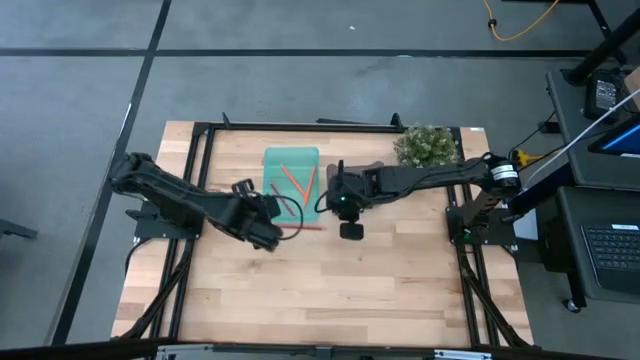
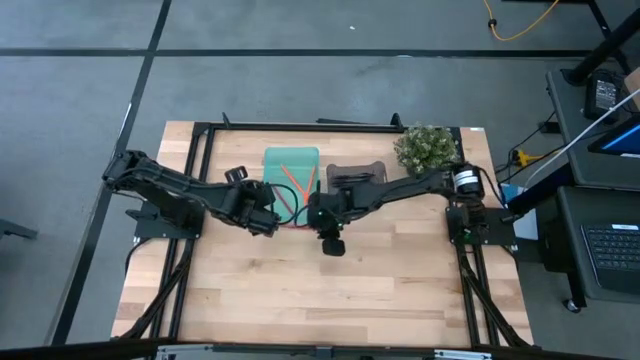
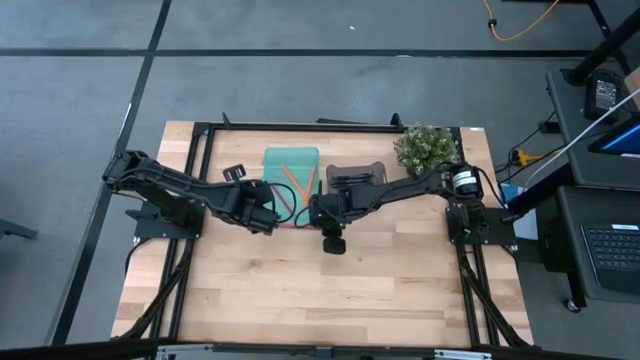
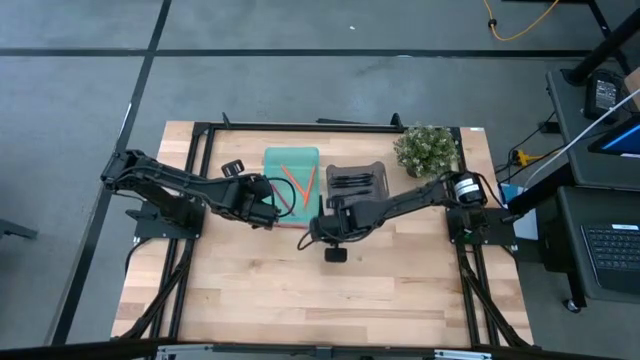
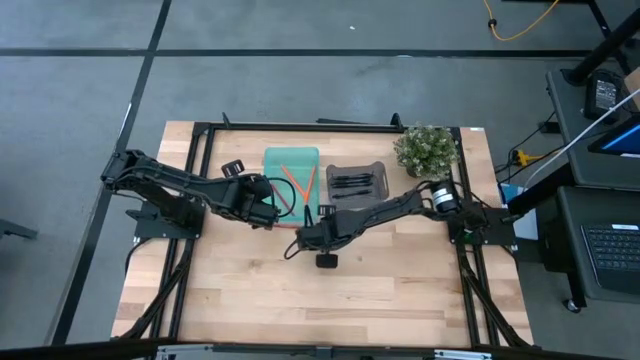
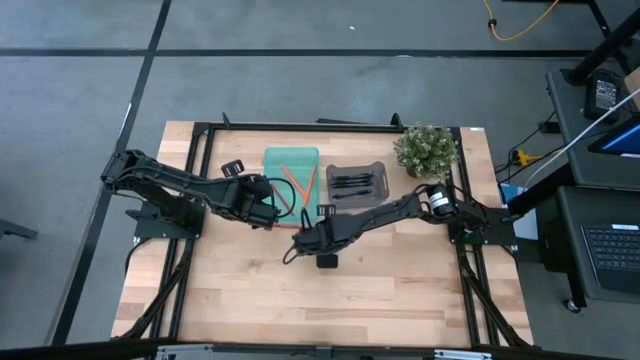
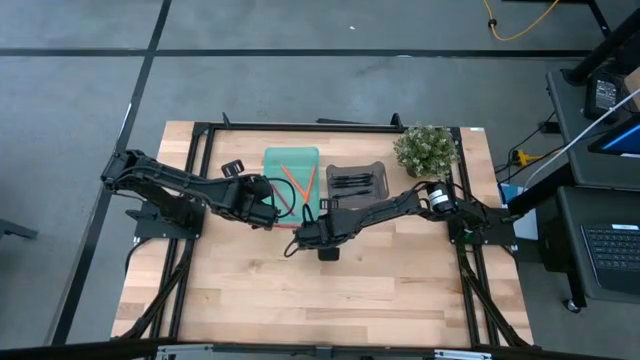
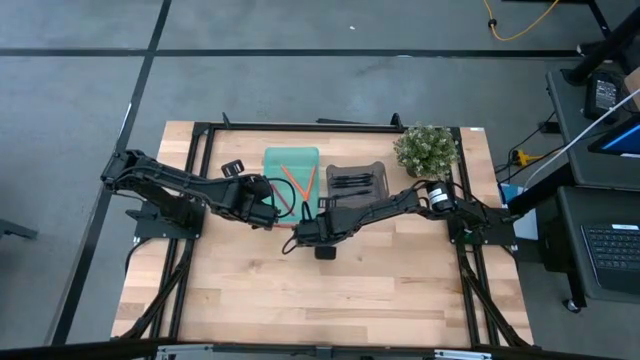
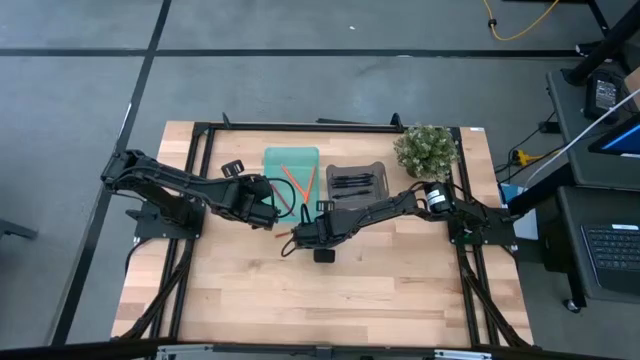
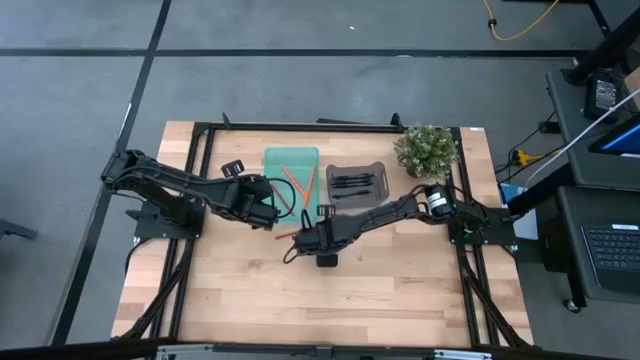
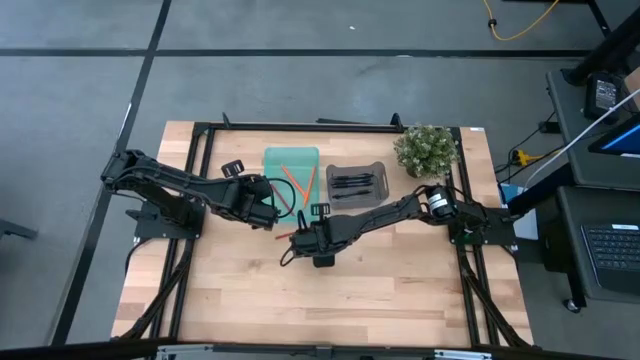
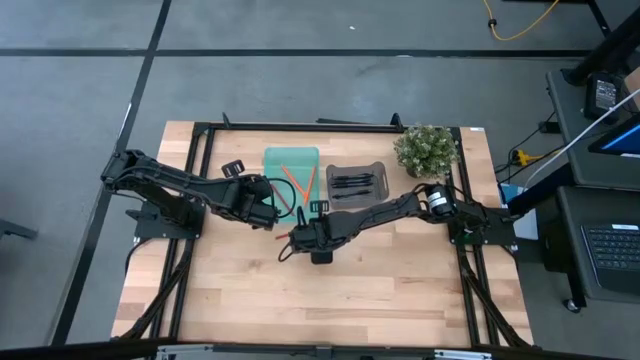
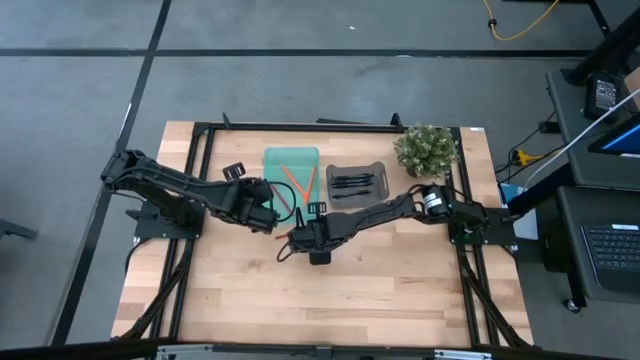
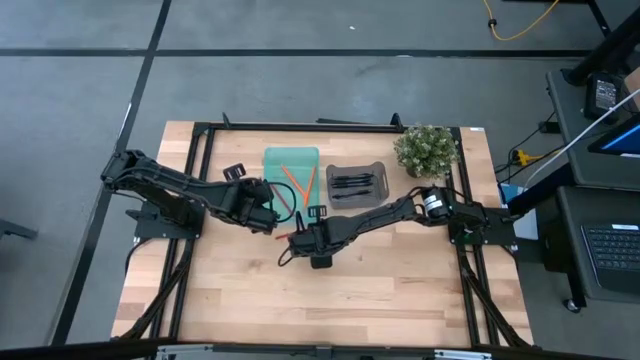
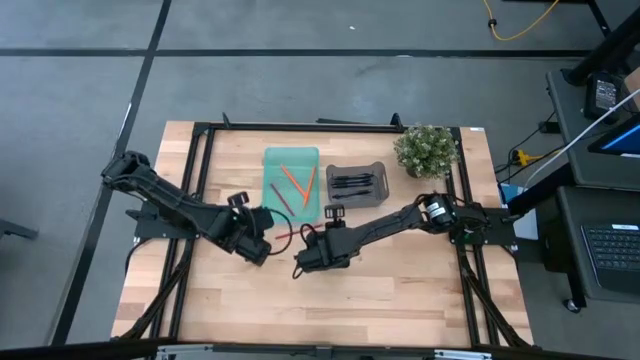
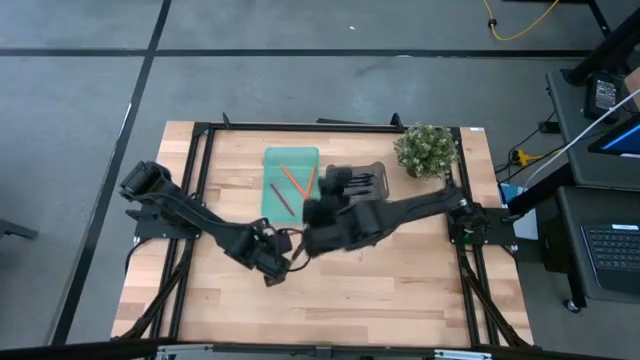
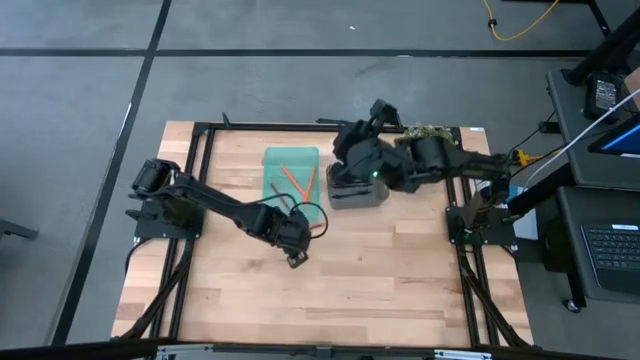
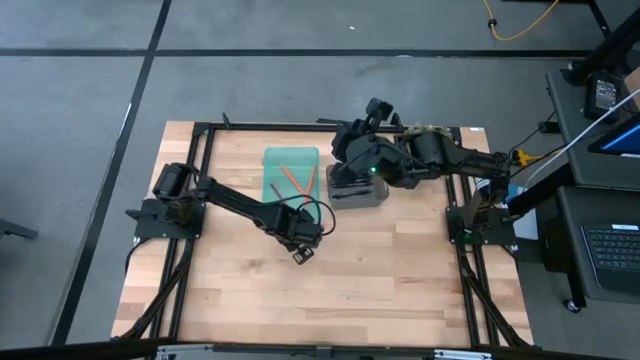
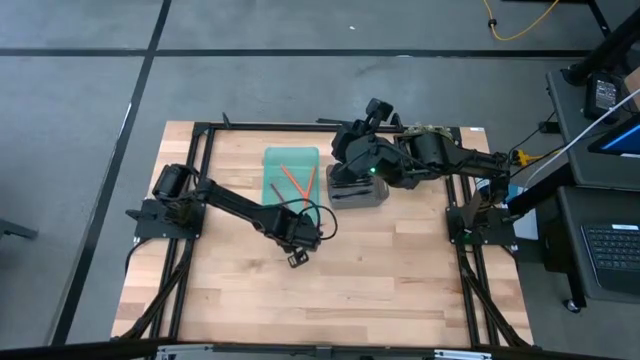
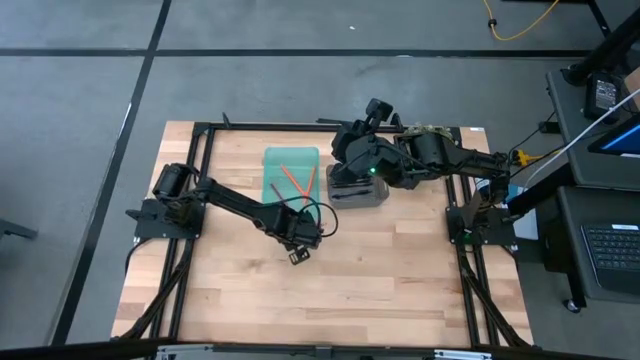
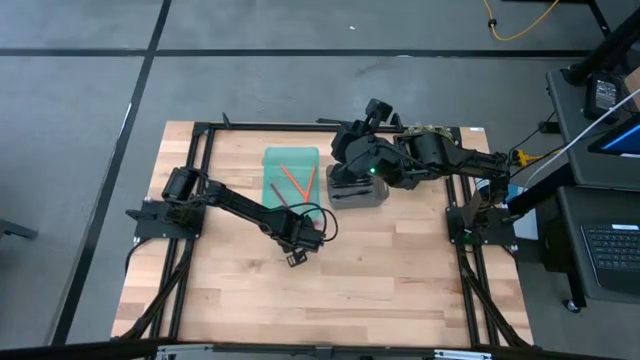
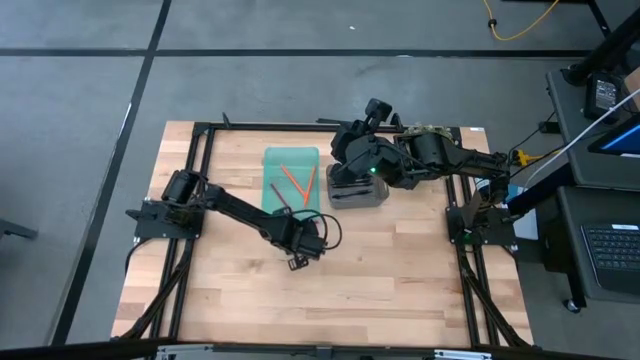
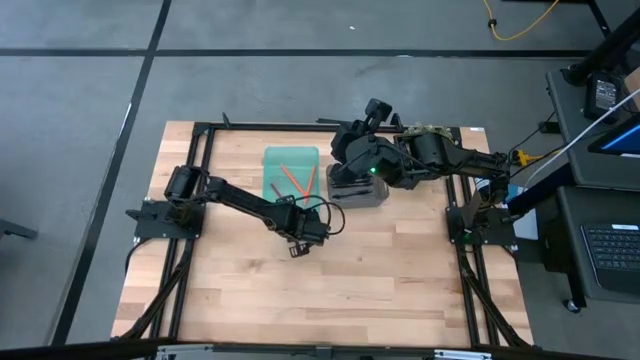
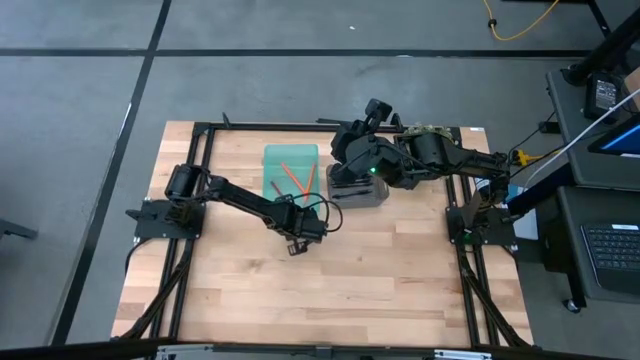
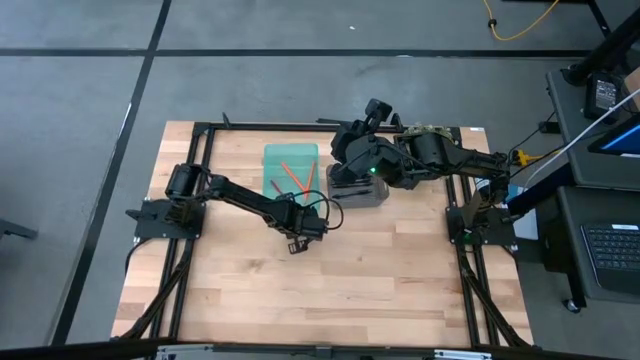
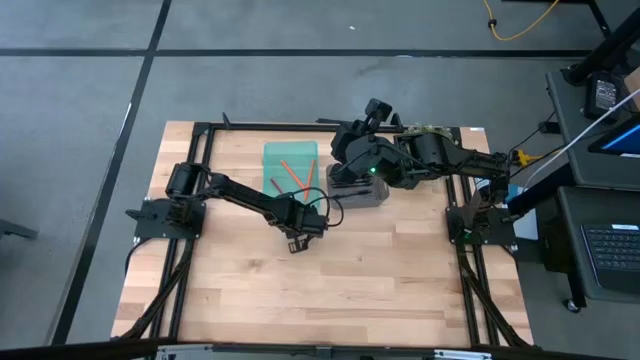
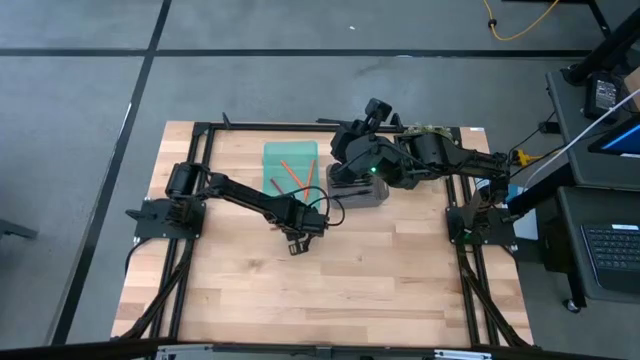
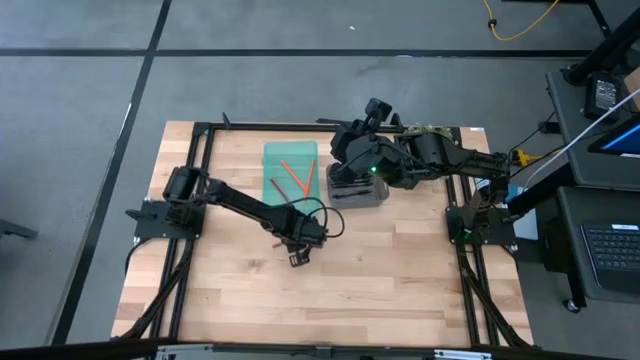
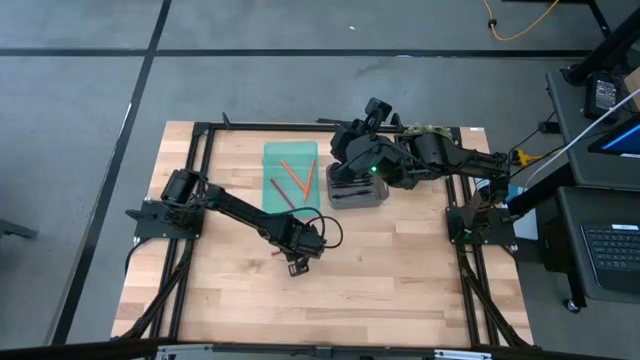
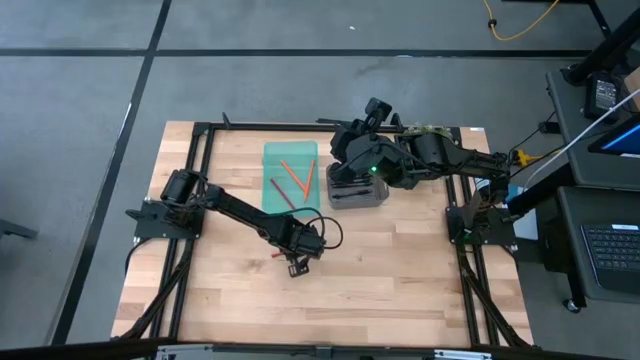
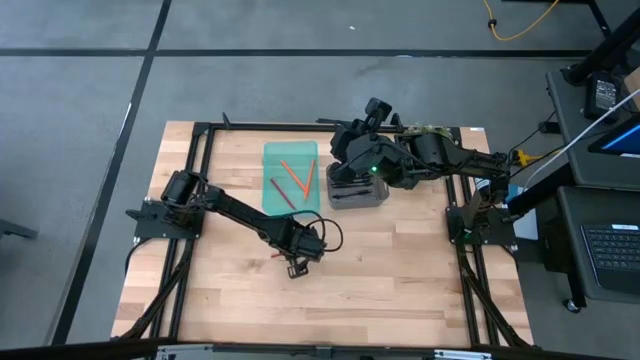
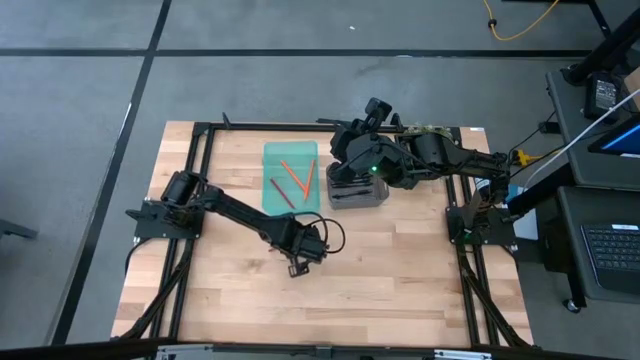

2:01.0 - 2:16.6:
Task: Sort pens & pencils
Put the red pencil into the green bin

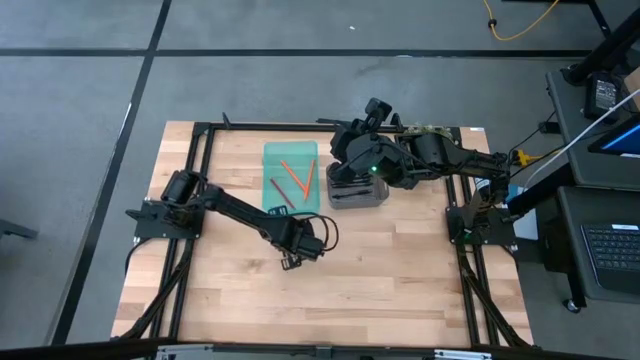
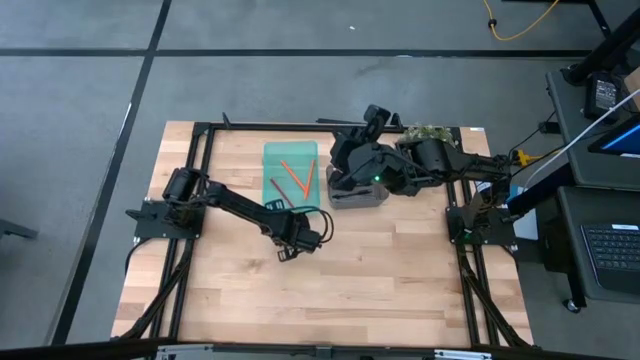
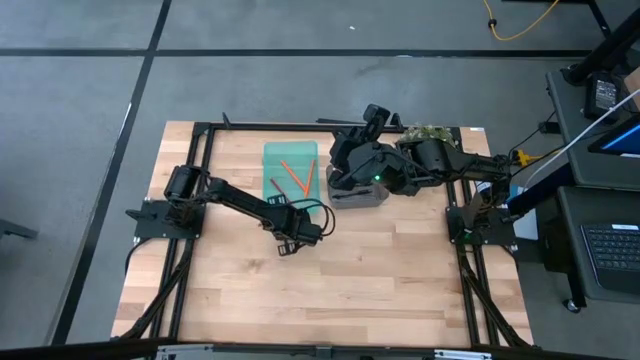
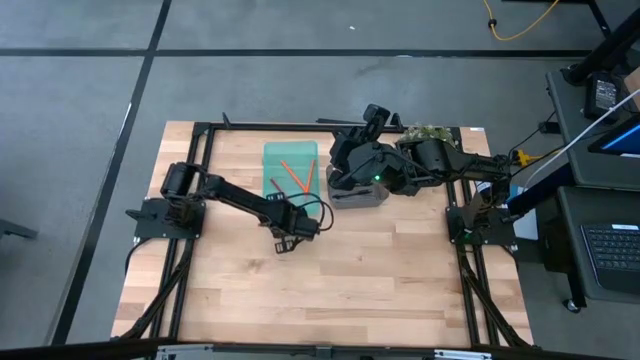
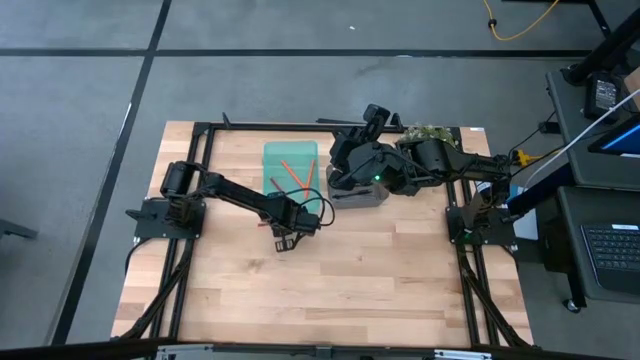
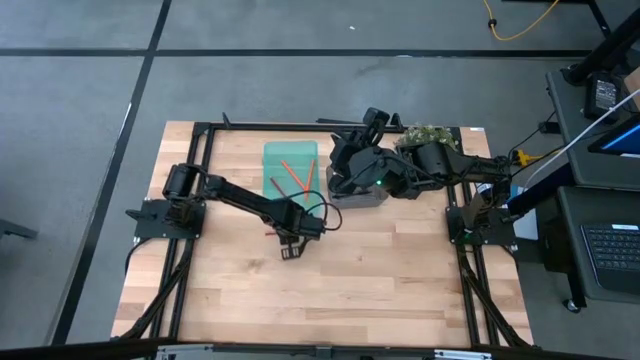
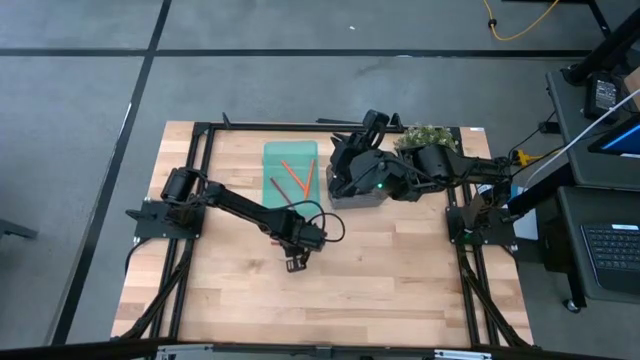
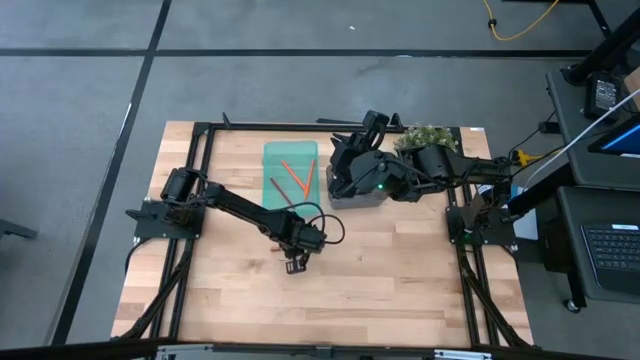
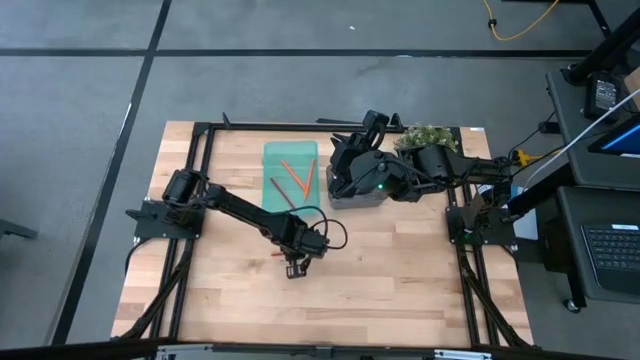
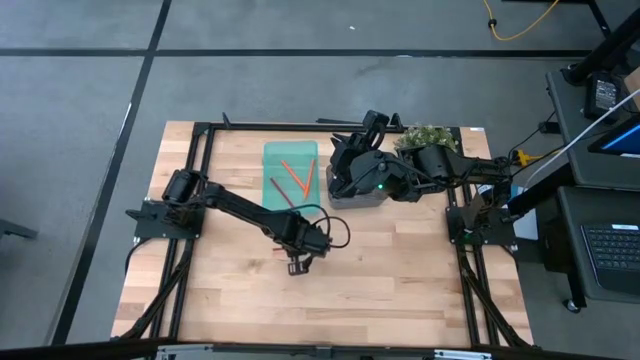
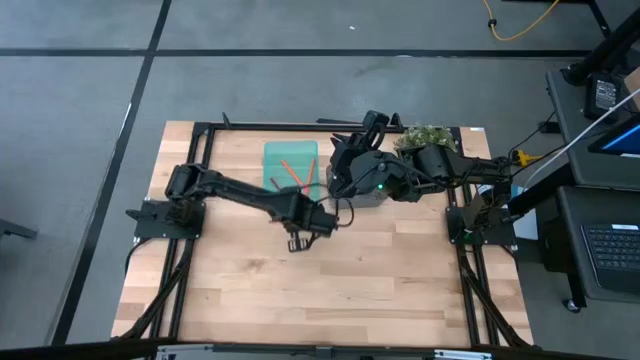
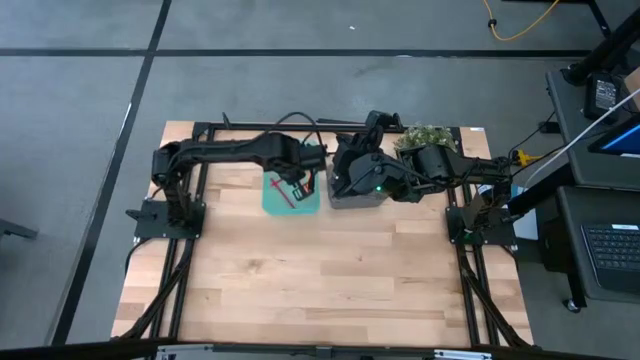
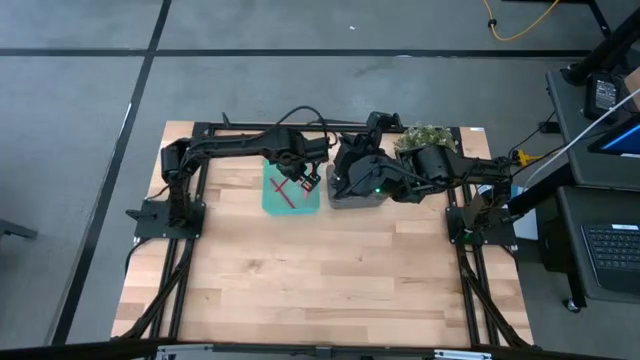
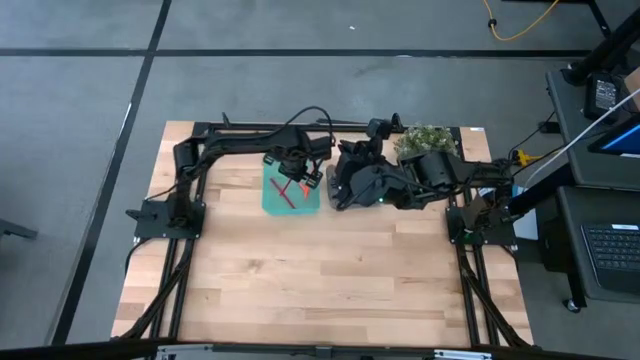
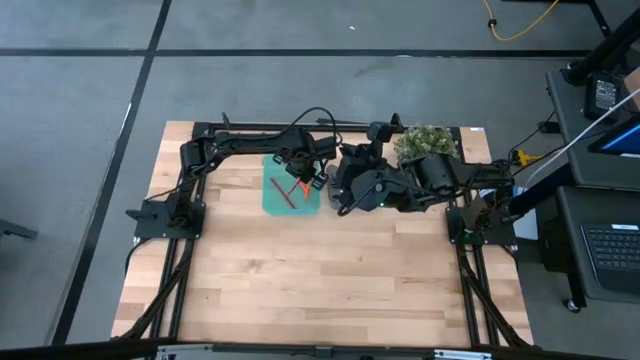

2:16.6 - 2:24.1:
Put the red pencil into the green bin
